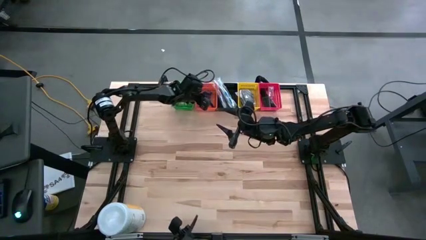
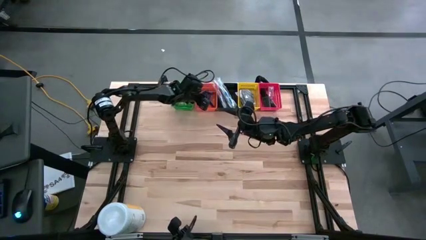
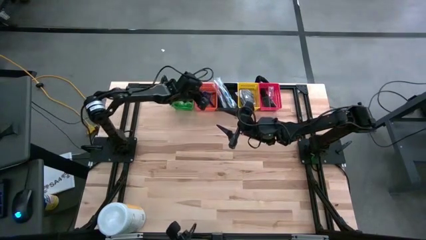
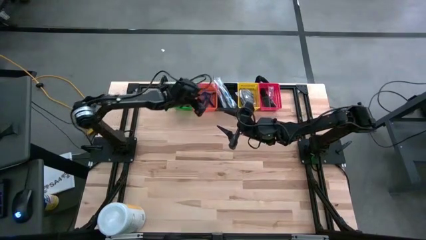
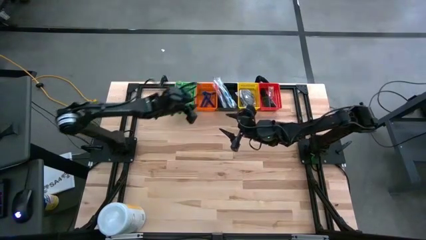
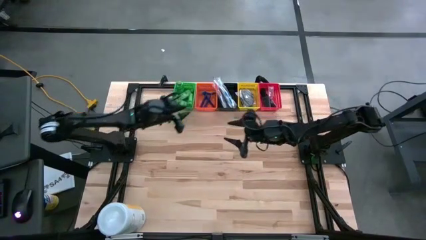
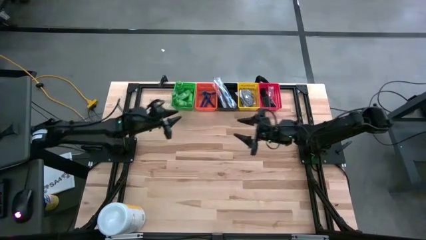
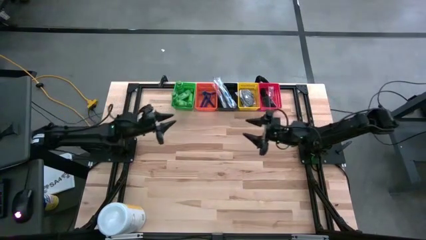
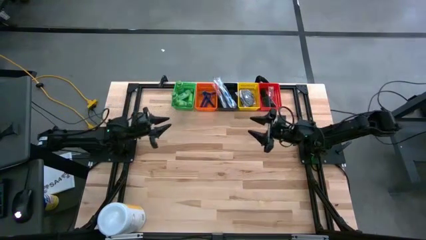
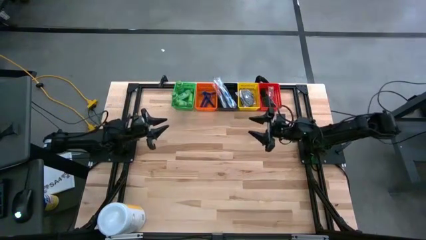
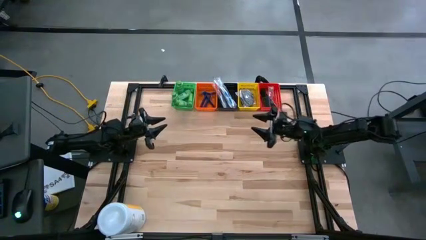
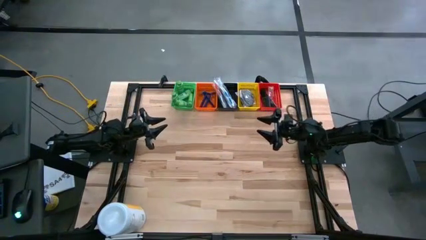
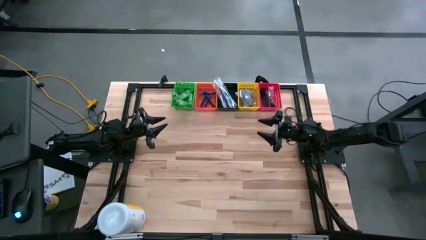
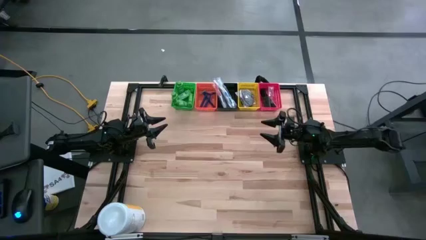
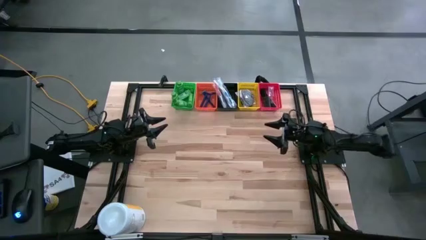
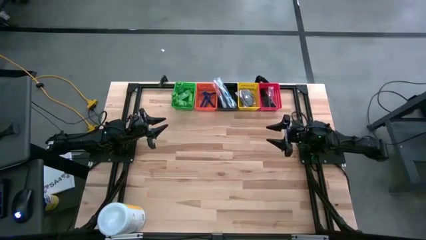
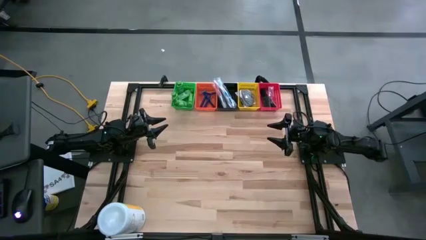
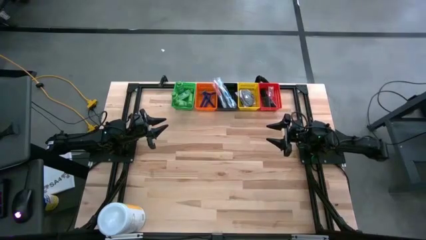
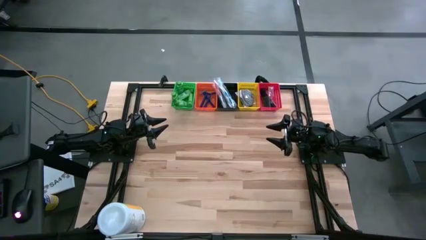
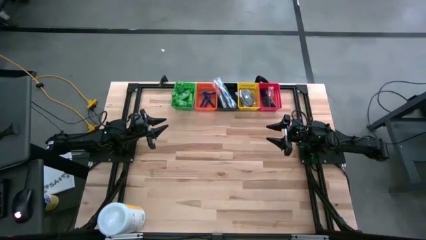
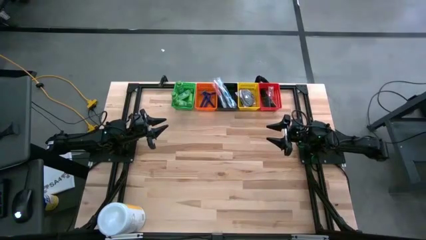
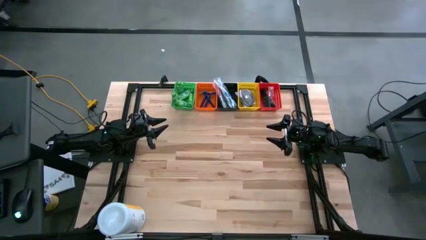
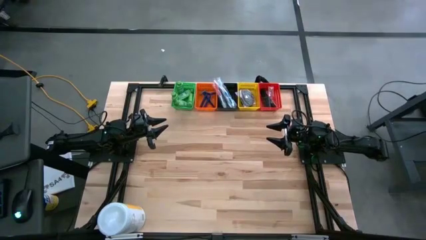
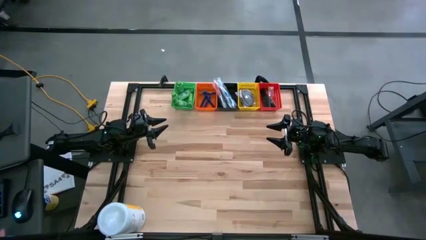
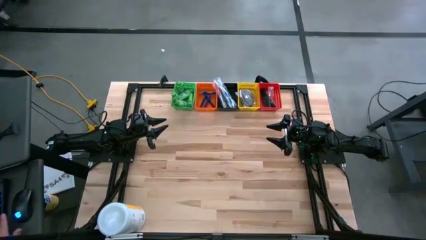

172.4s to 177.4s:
Task: Pick & Place Travel size toiletries
Return to Home Position

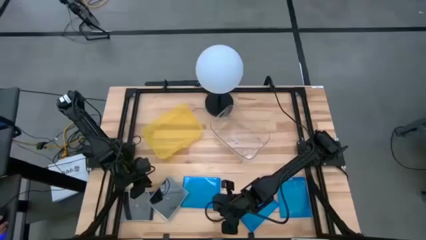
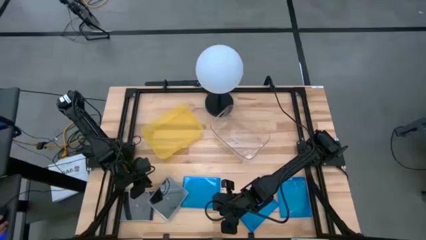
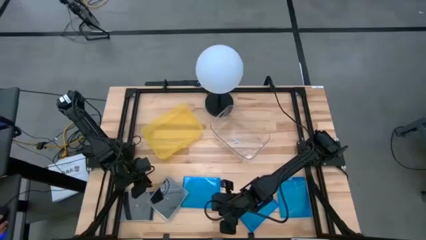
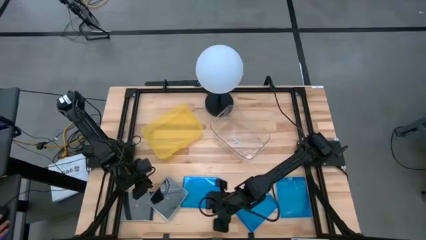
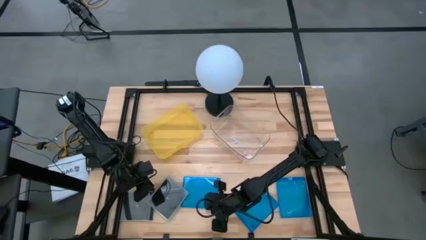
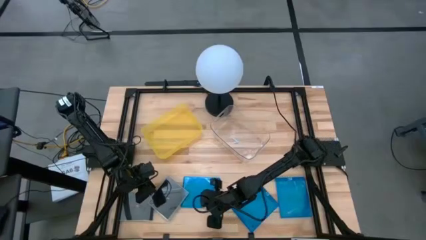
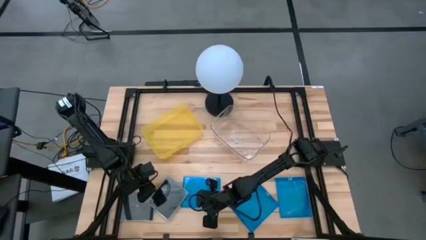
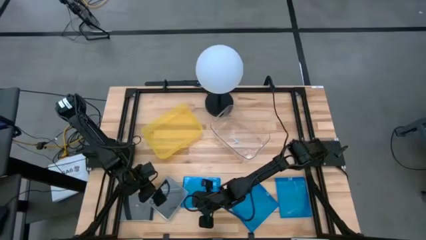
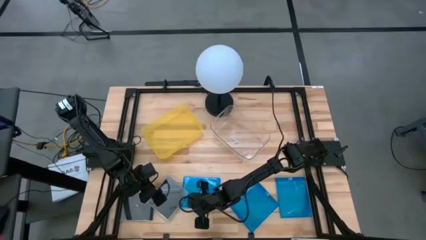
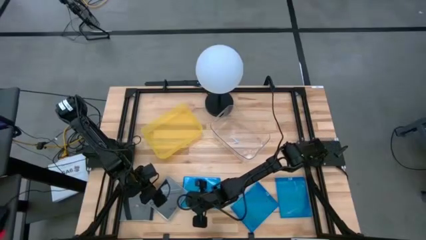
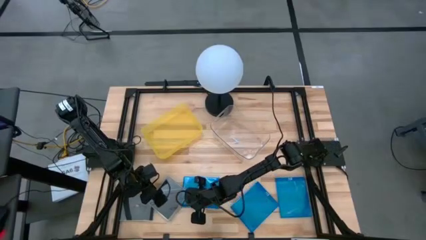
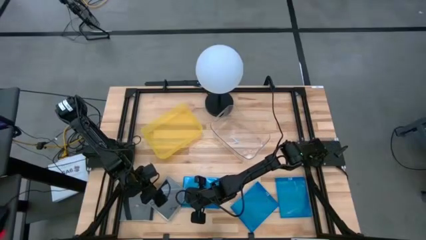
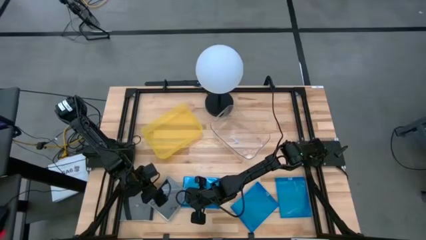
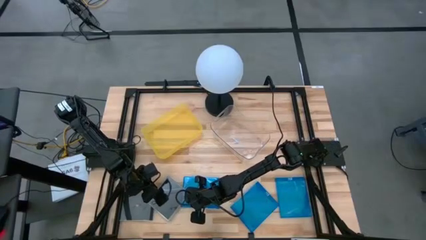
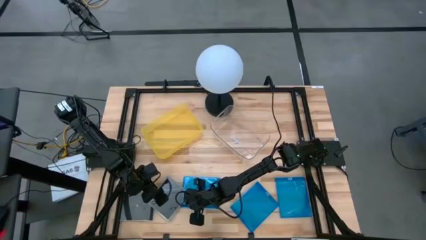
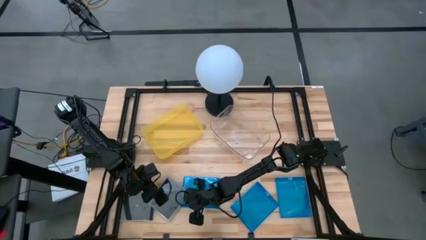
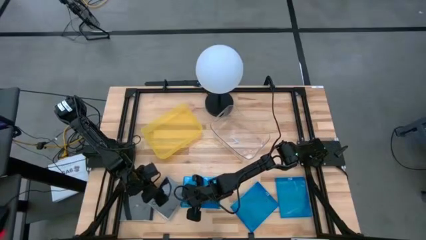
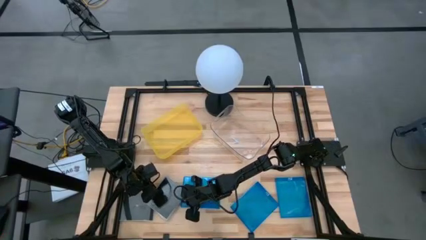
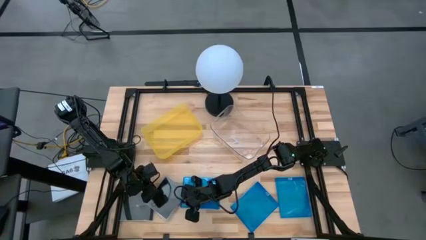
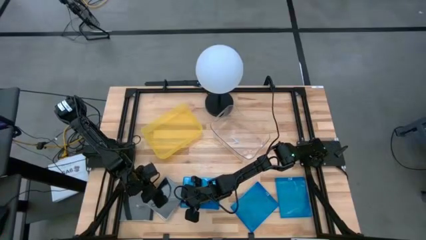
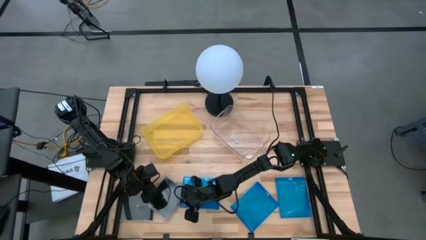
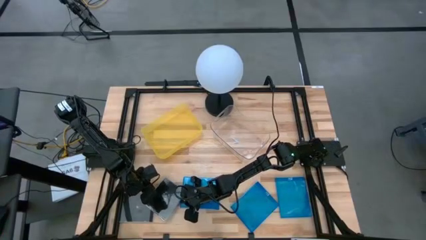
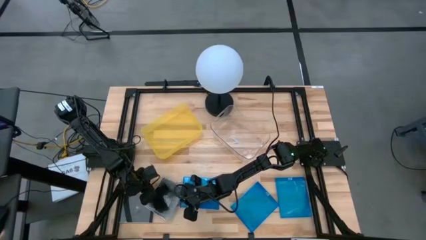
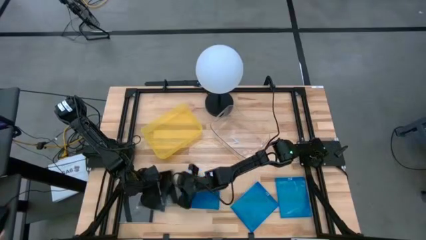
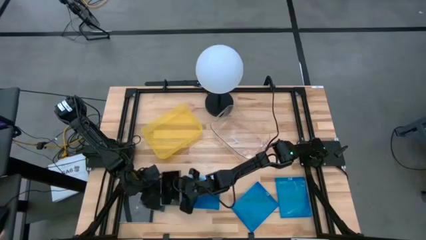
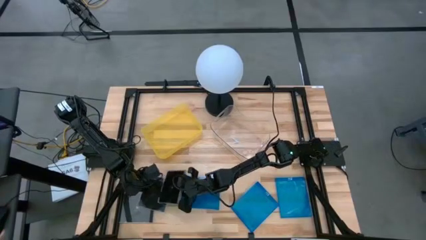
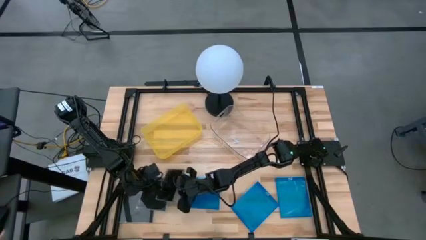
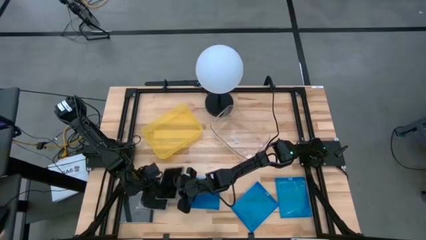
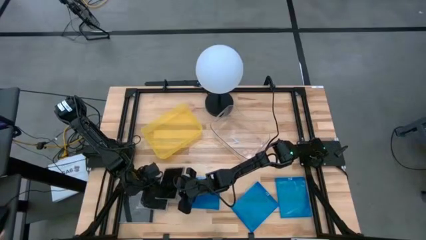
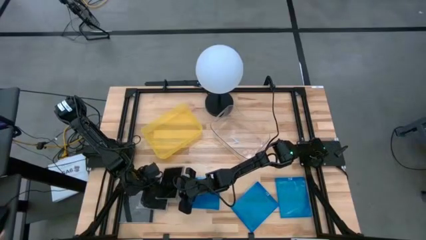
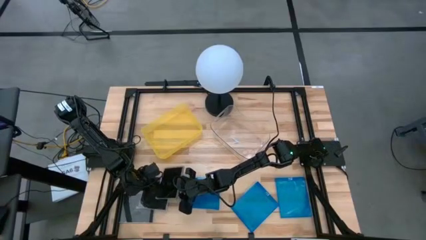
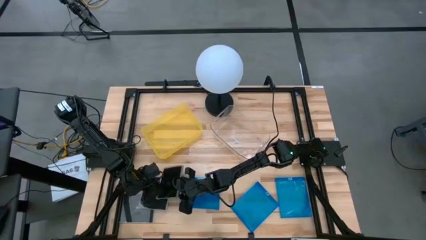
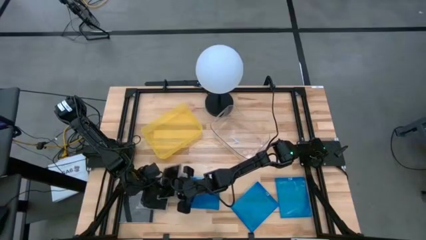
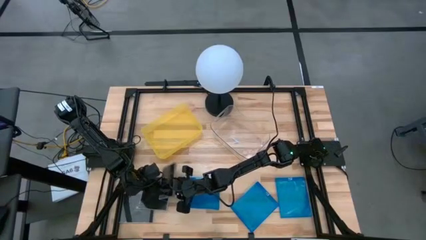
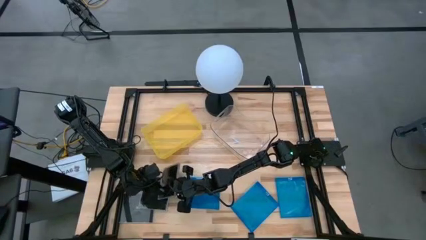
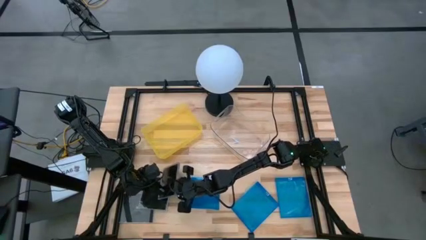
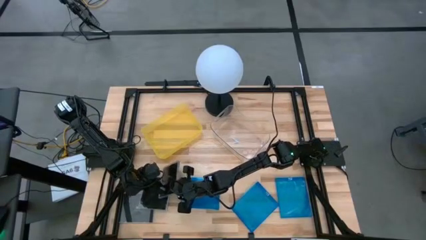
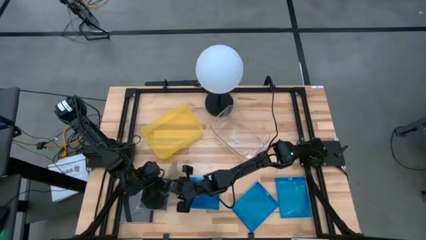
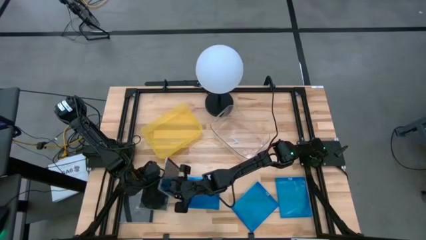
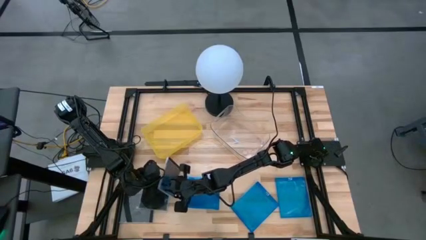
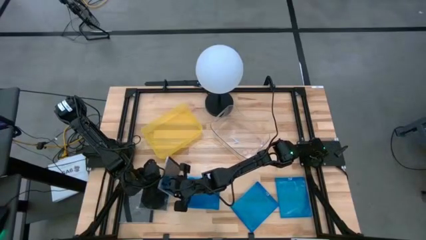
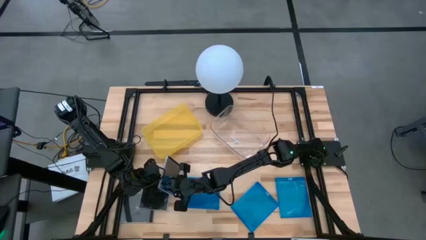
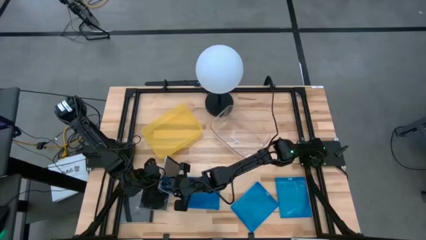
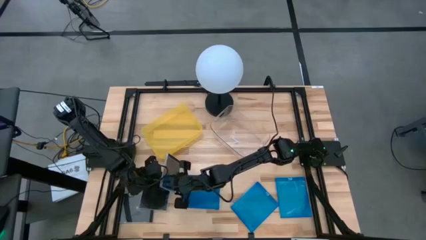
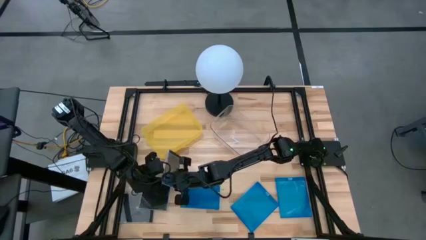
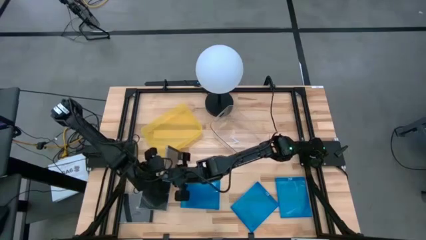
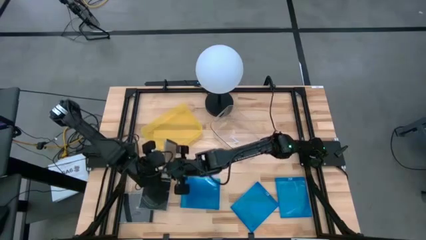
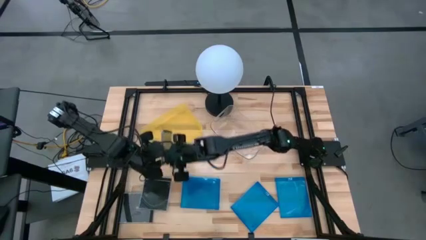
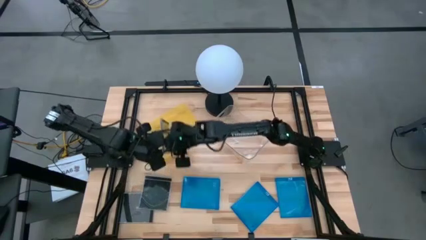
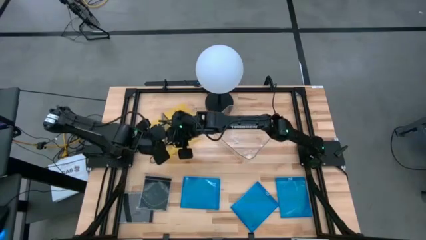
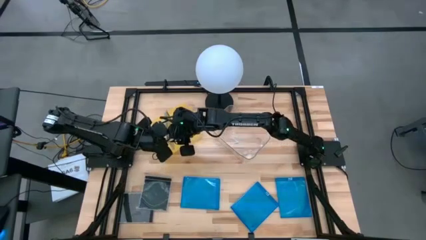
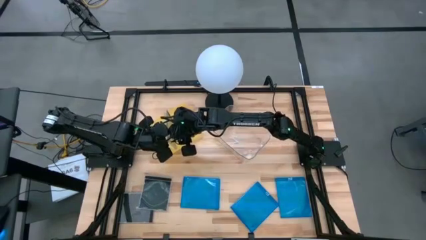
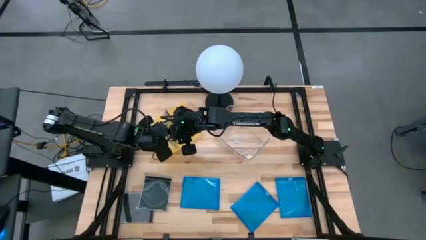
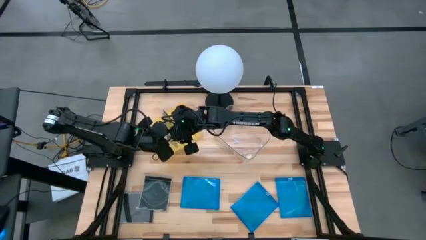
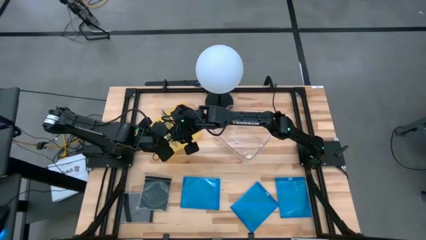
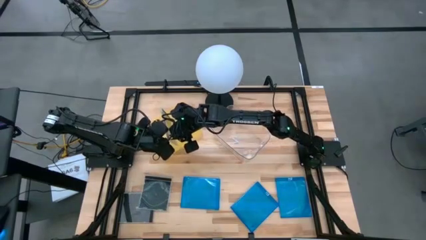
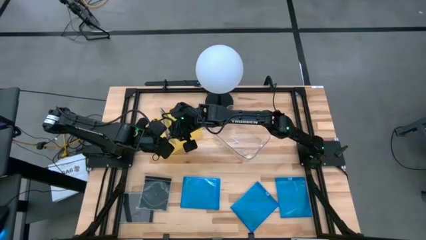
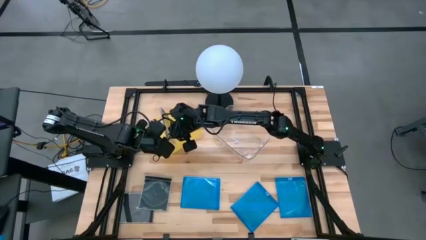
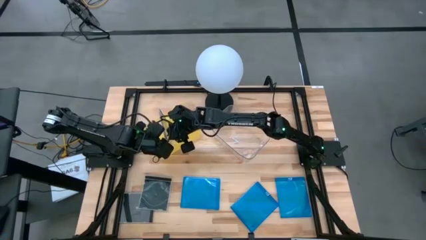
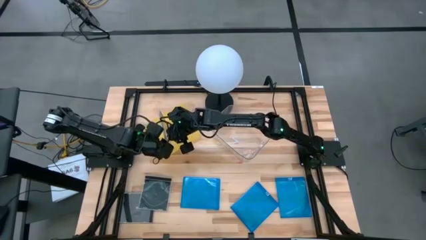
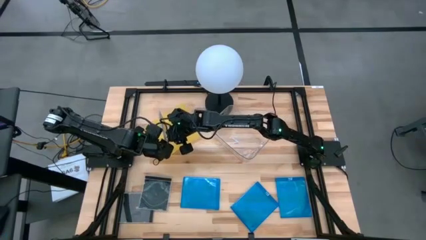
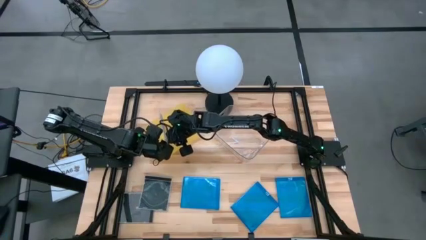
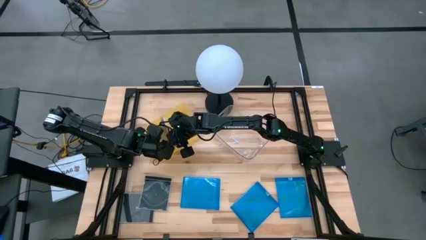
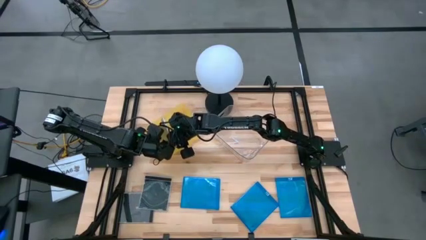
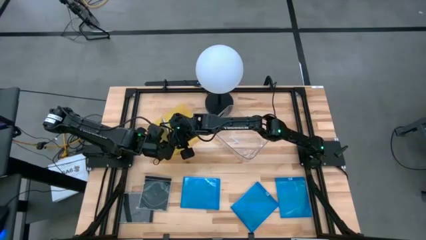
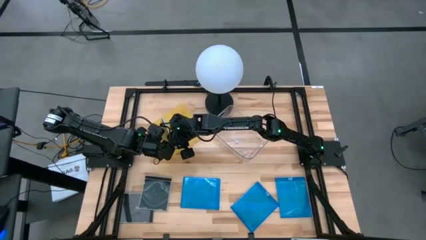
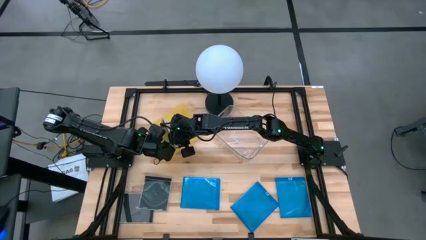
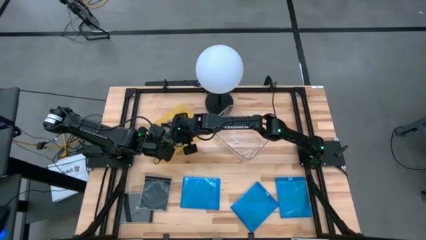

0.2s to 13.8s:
Task: Pick & place jewel cases by type
Put the right black CD case into the yellow bin
